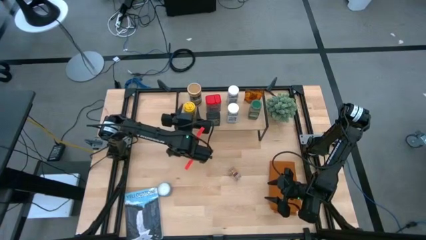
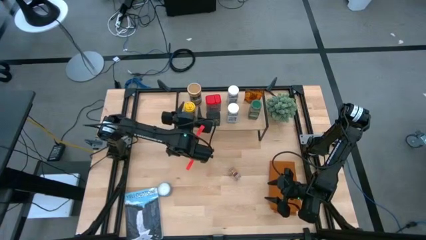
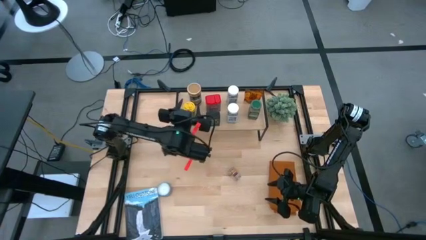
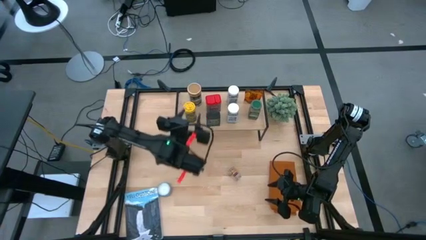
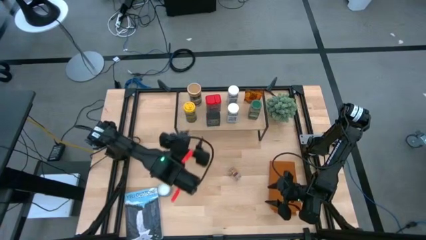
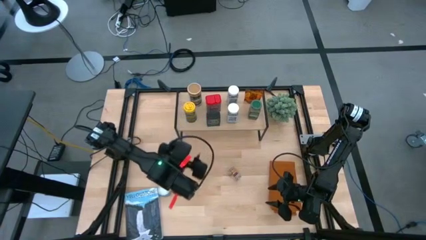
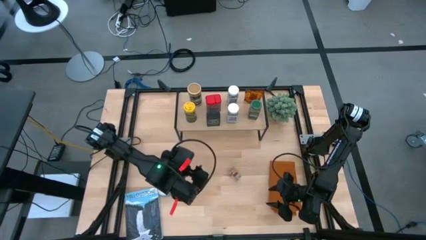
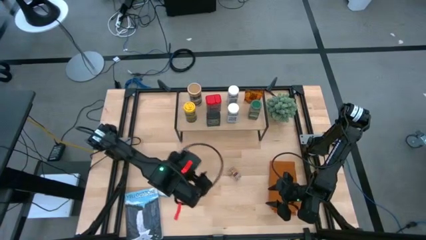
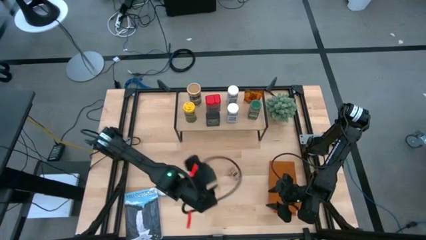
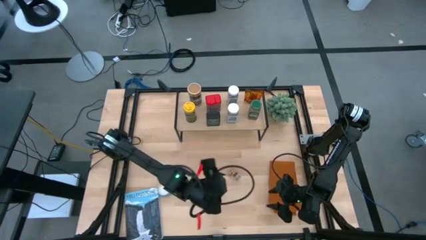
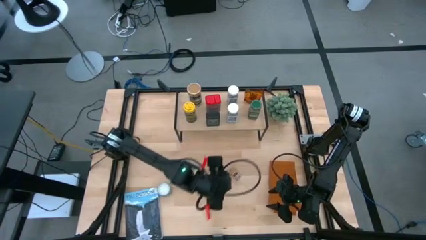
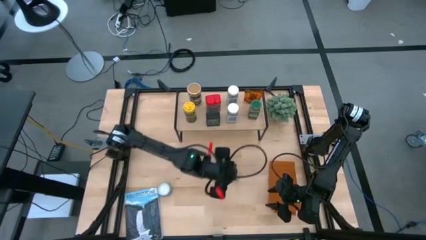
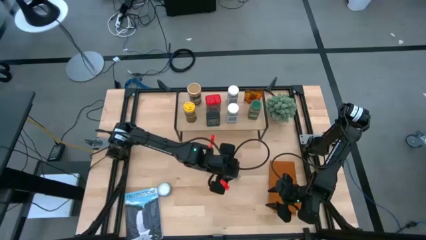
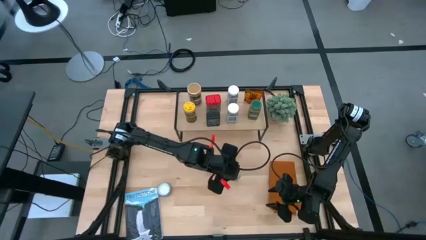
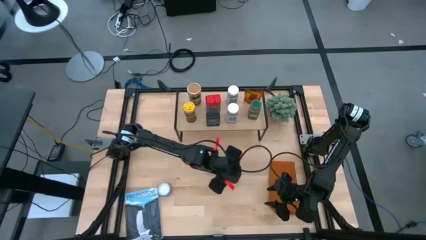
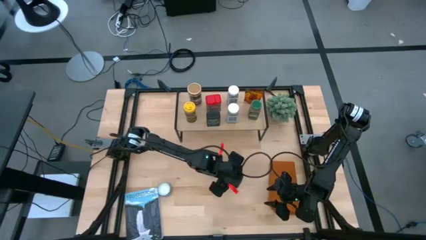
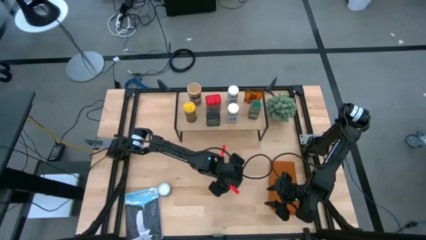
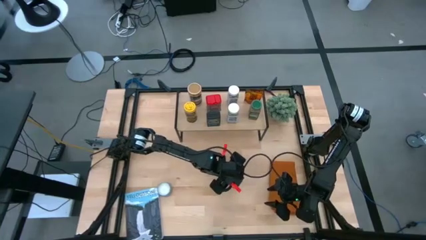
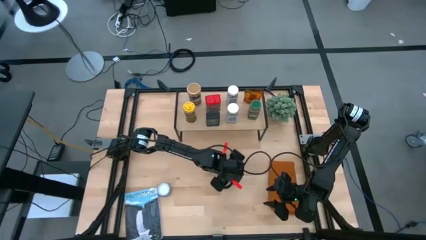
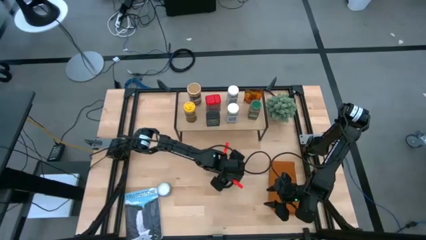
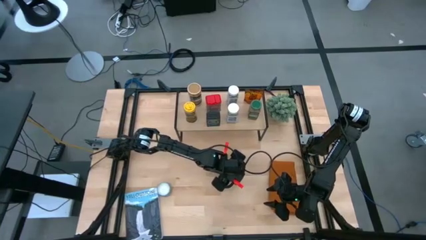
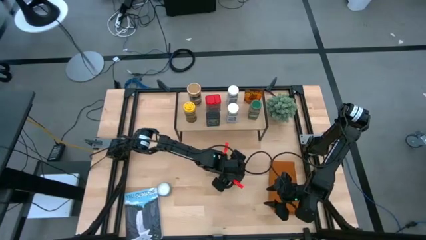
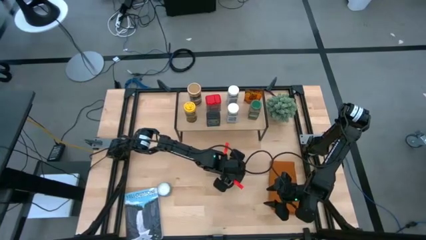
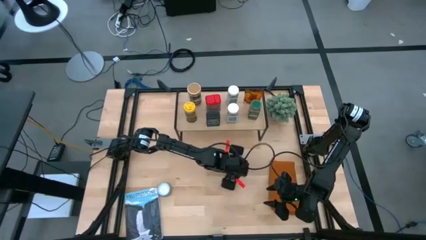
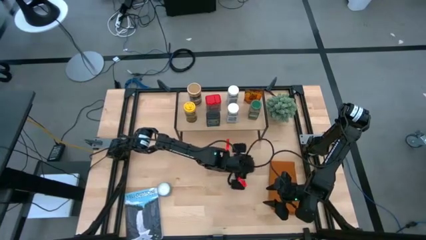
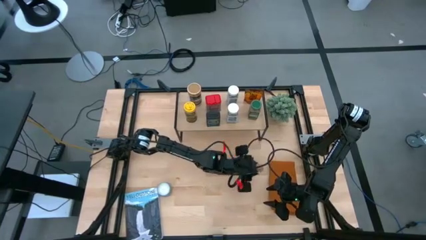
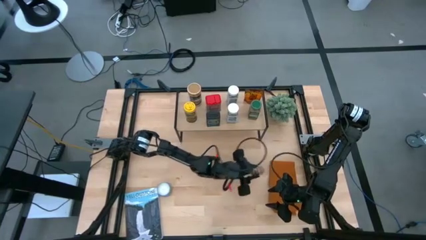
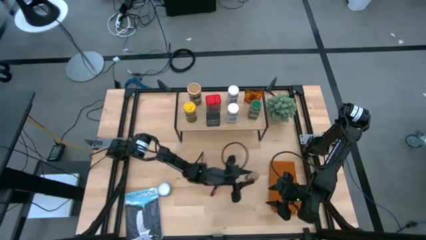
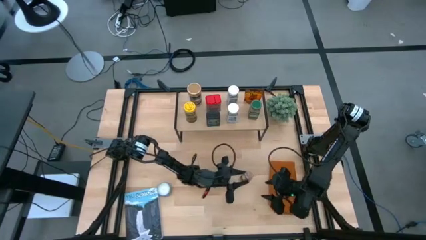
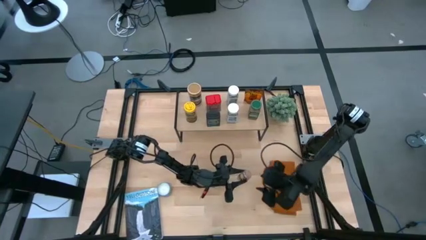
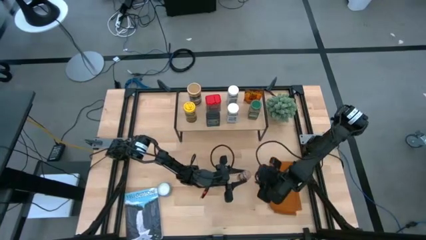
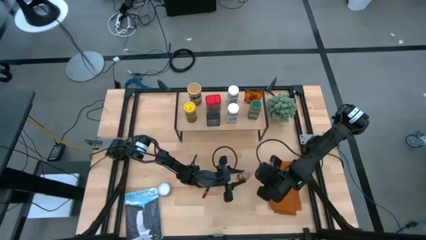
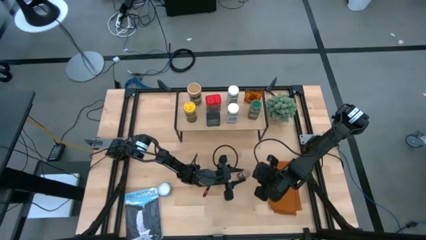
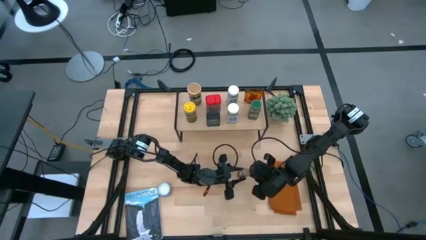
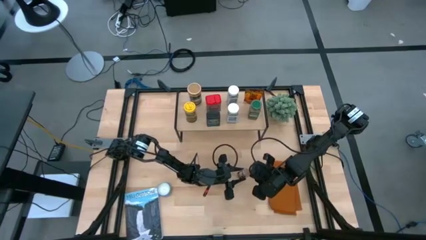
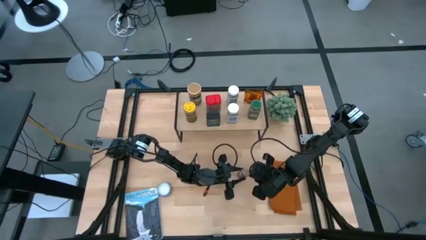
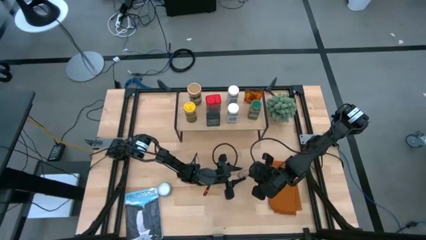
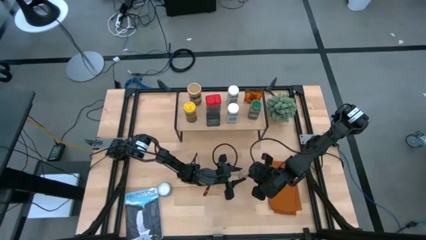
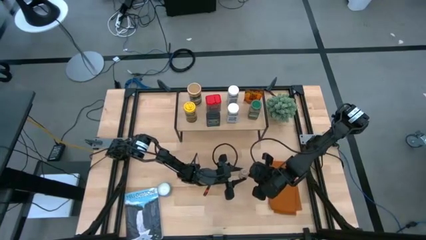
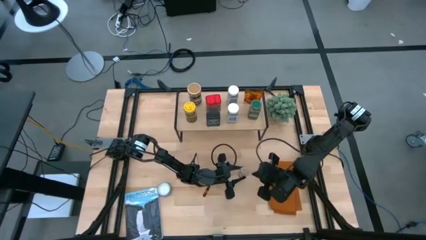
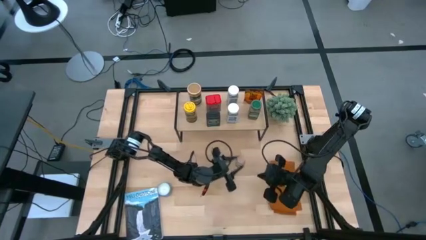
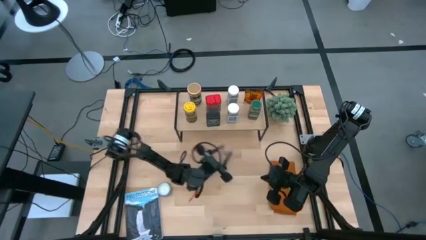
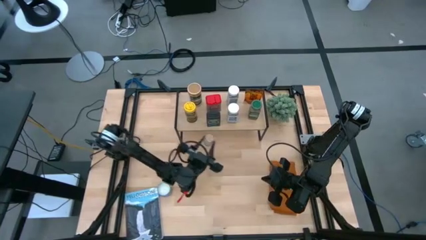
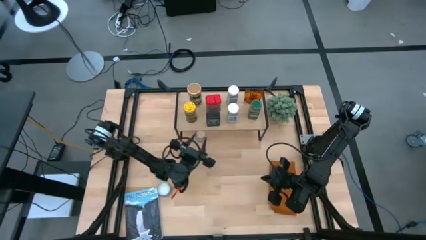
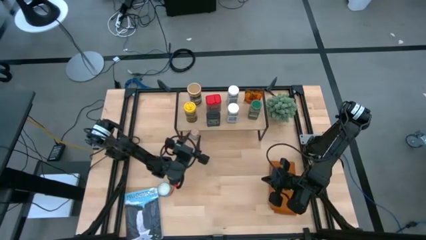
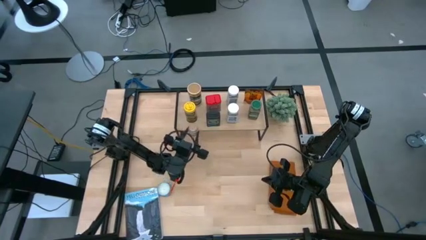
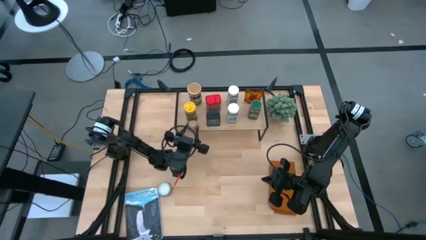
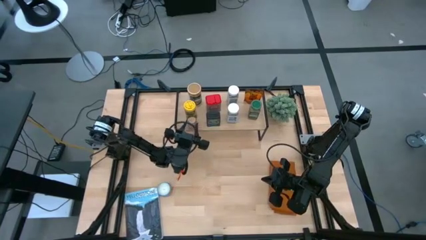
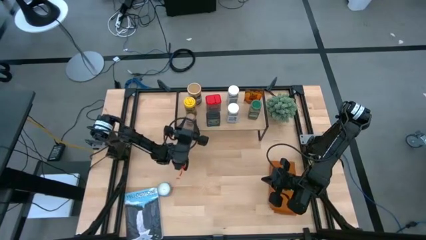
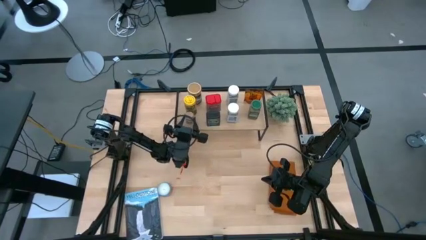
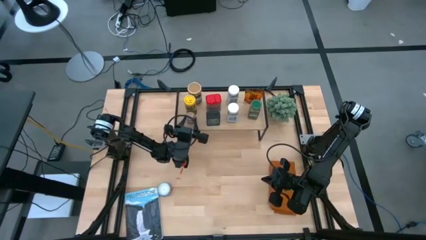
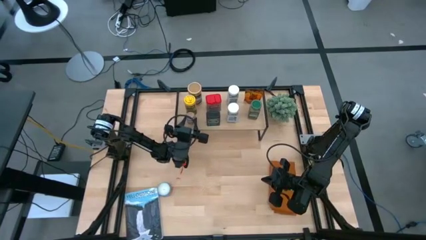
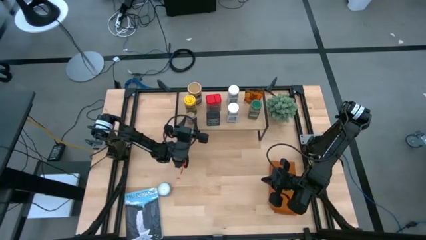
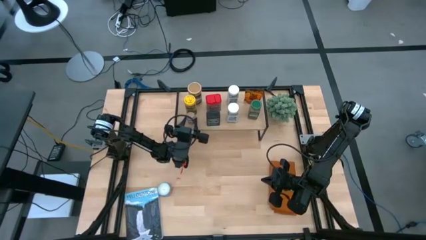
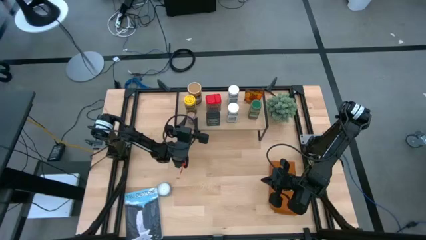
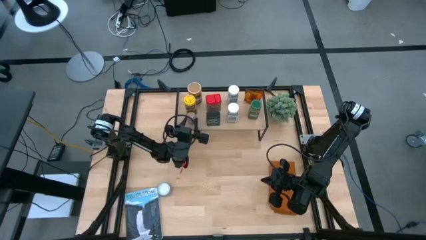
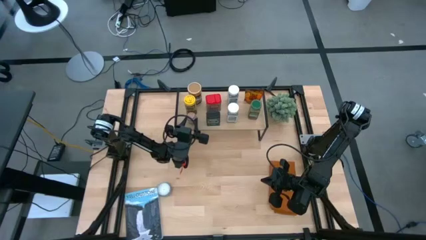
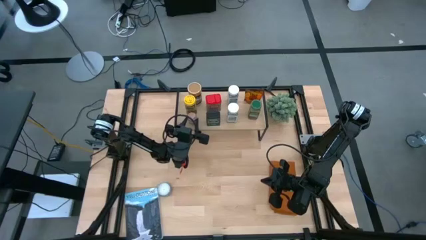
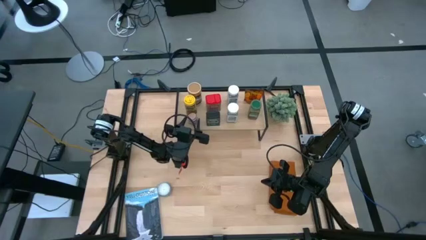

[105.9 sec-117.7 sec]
Task: Shelf spices
Put the brown seasoning bottle on the shelf

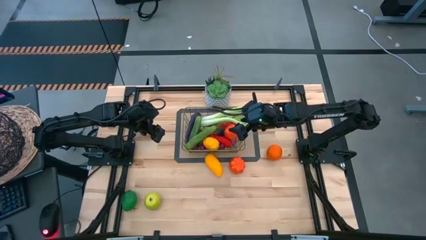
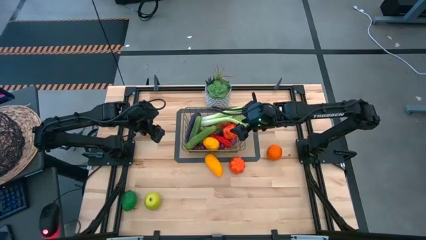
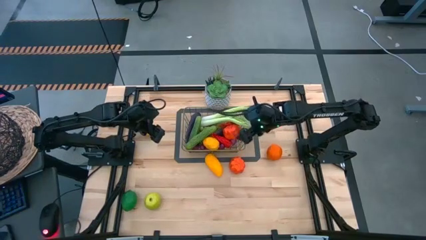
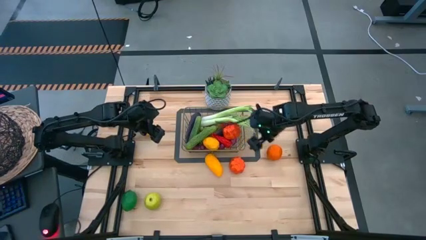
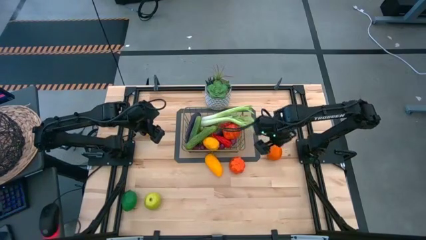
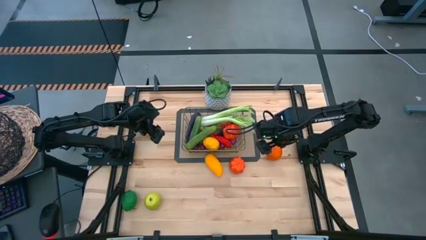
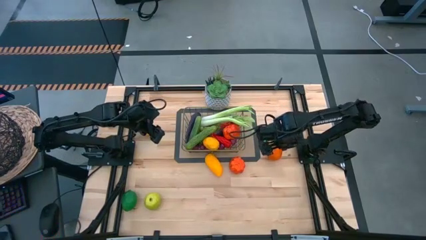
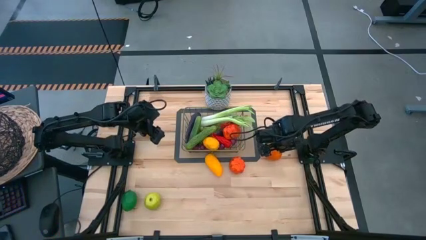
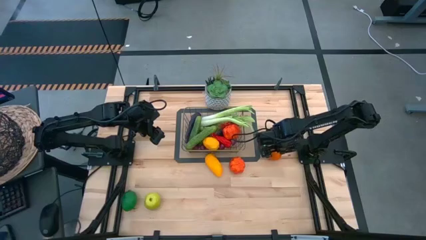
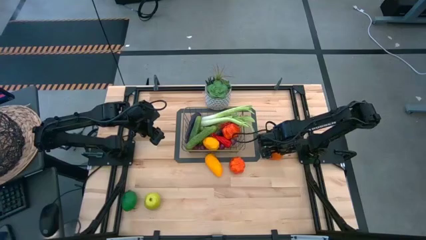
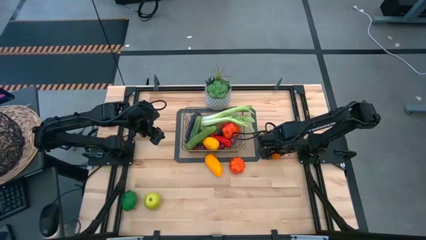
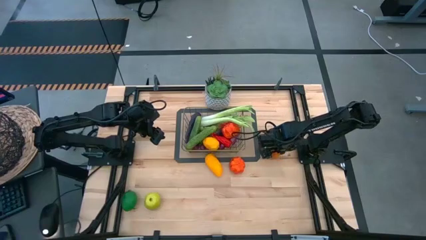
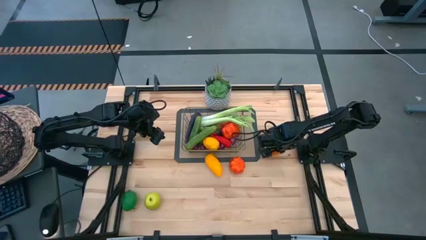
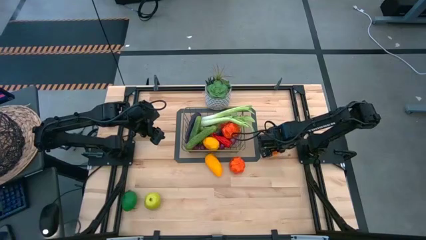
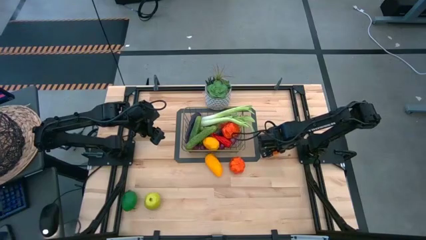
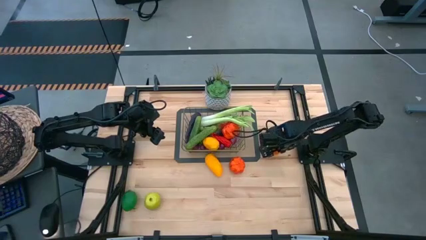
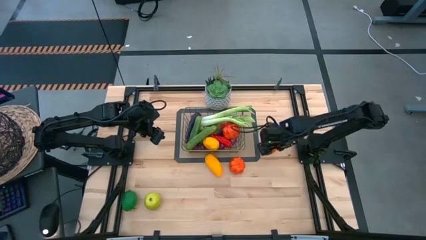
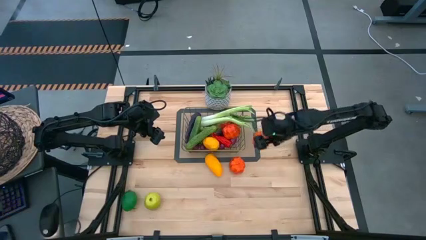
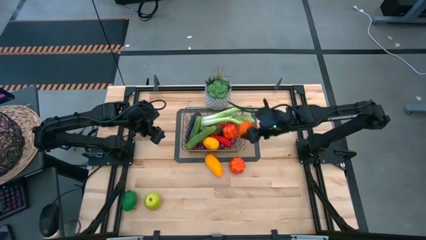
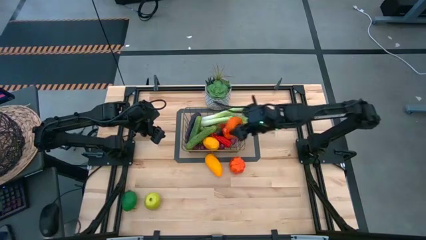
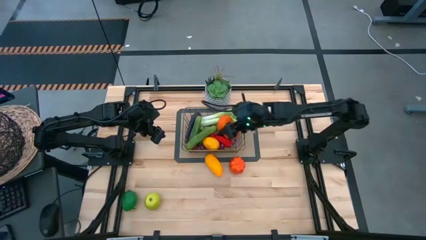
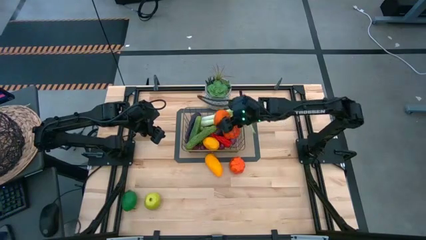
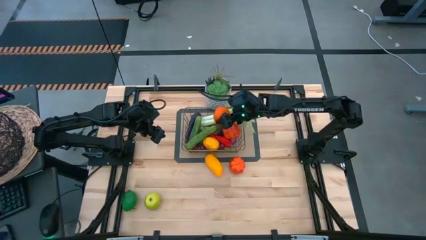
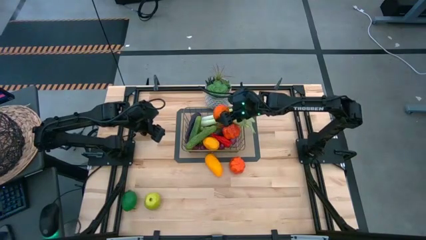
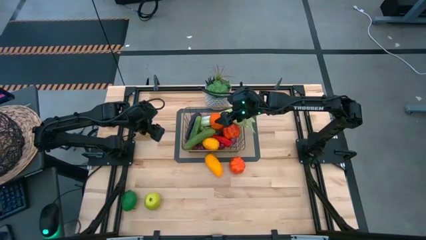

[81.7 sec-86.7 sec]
Task: Build produce basket
Put the orange into the wire basket
